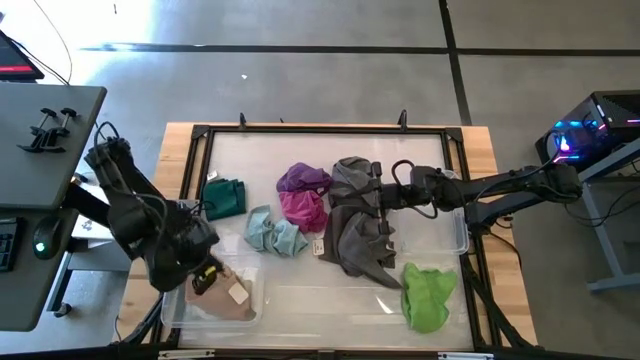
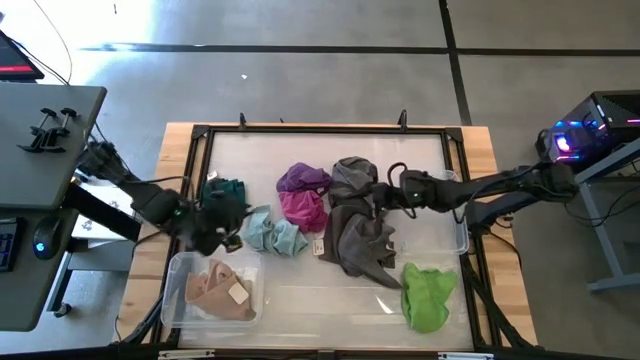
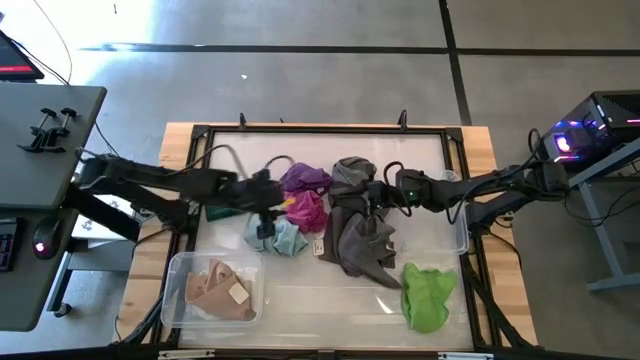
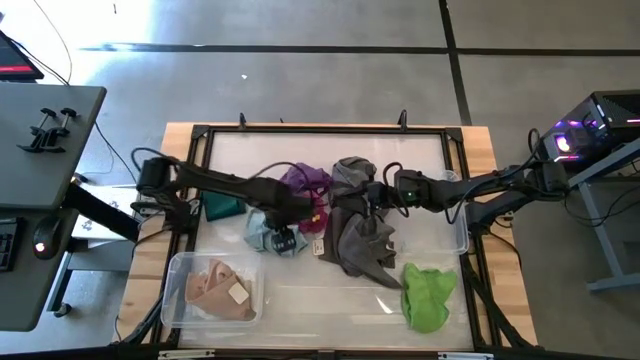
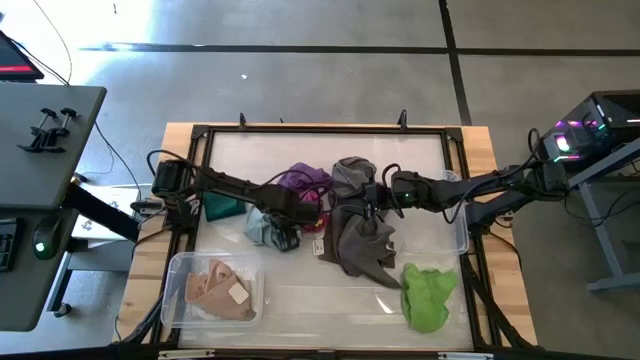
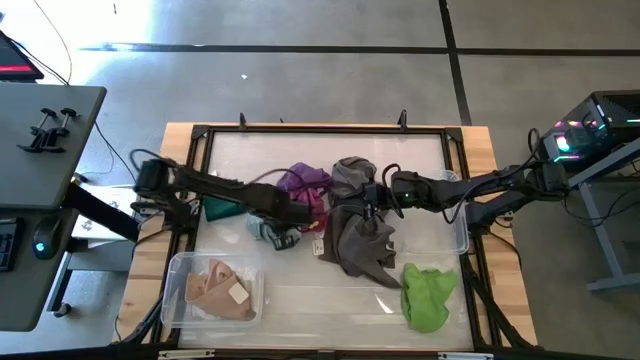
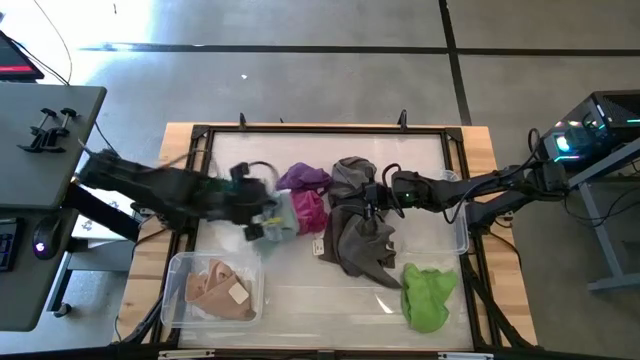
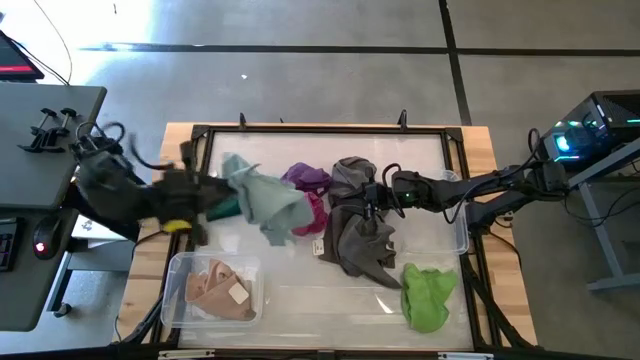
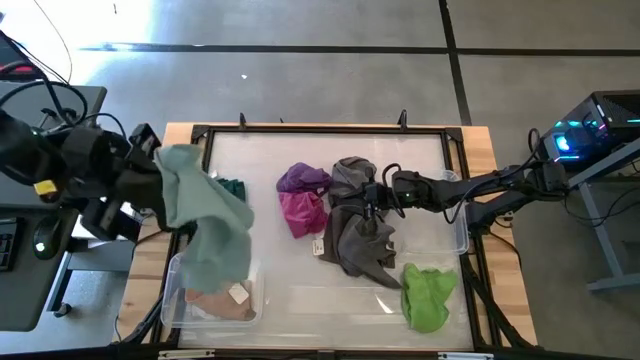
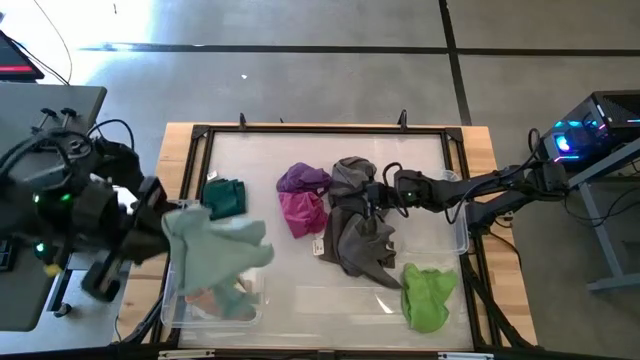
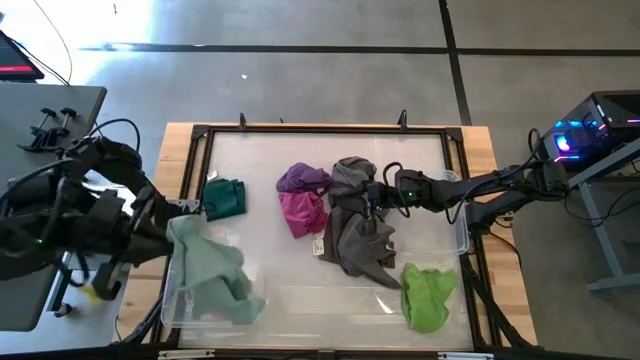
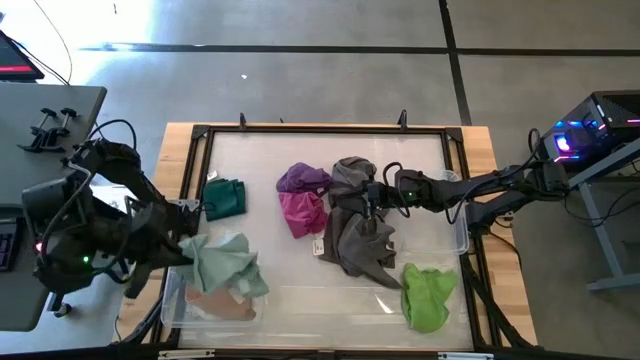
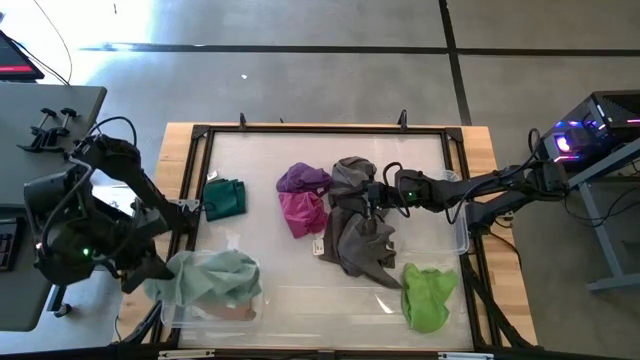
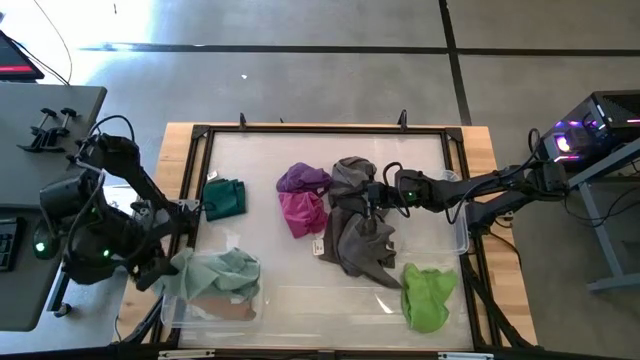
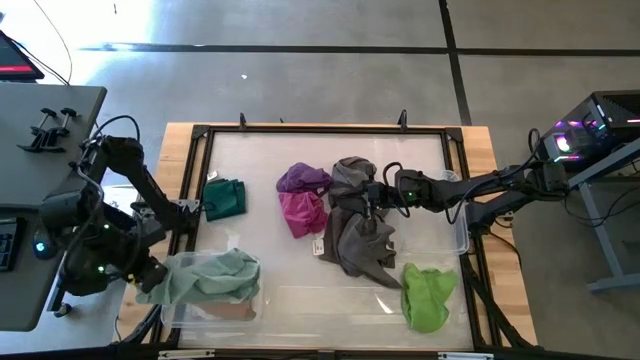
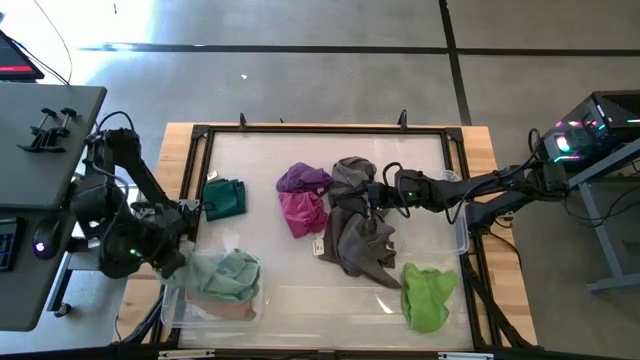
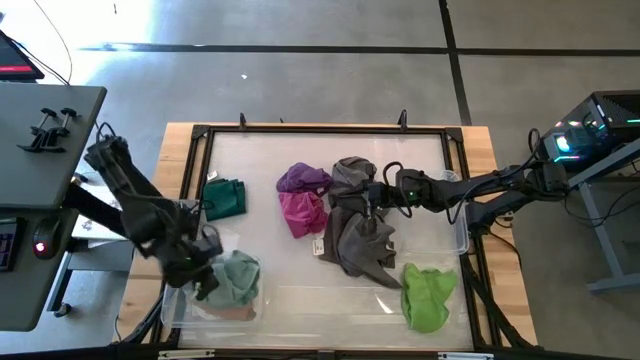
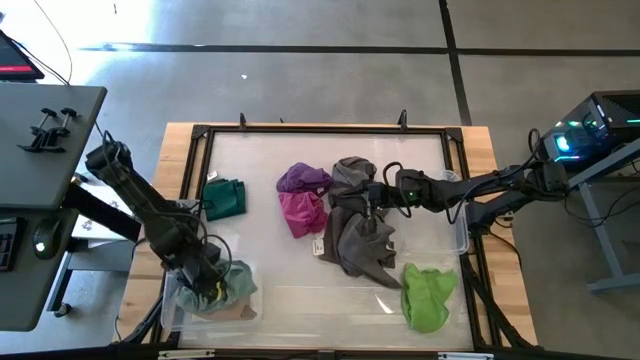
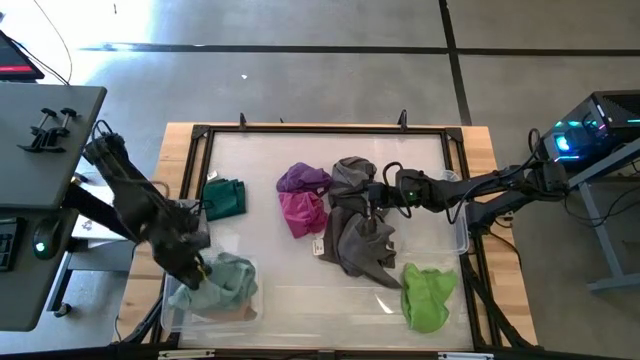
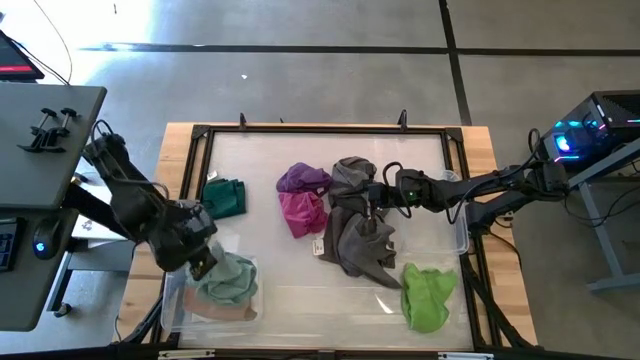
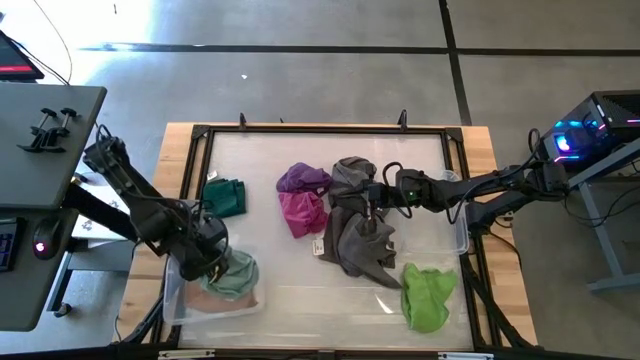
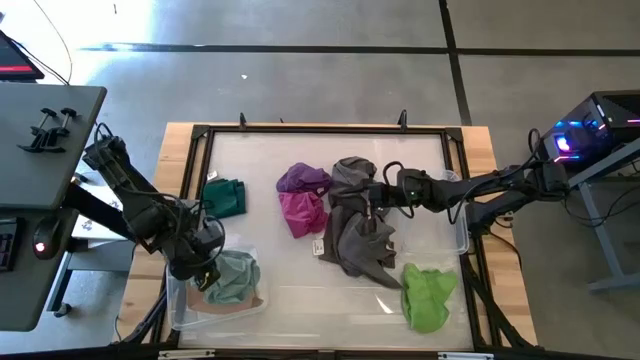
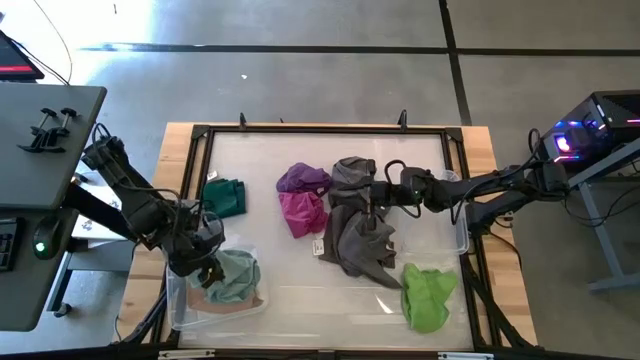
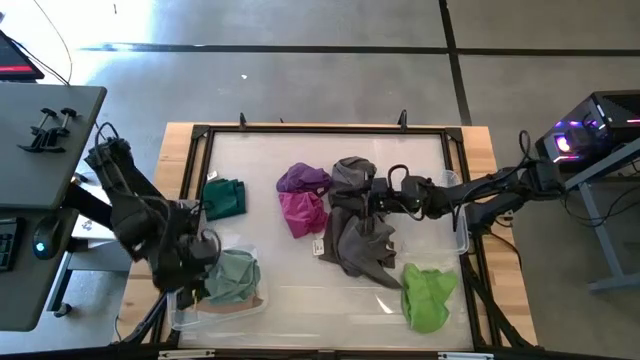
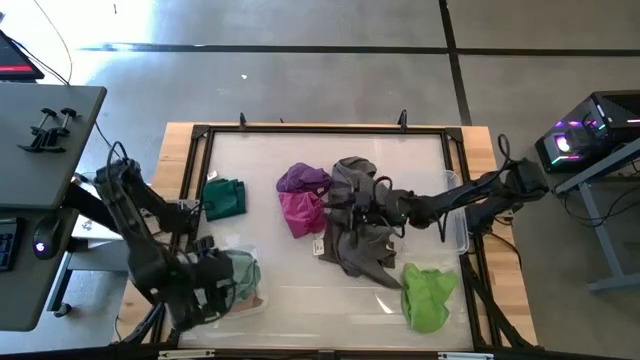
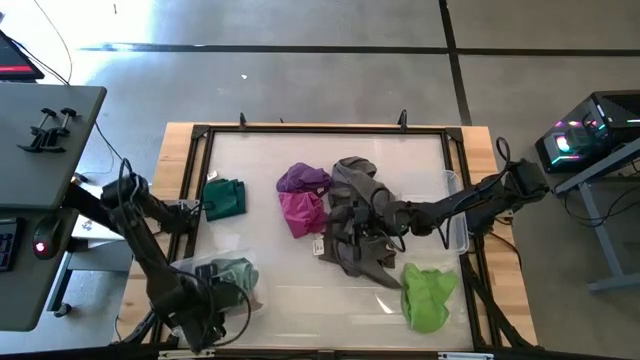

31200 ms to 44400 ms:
Task: Sort microfiber towel by color & place in baskets
Put the light blue microfiber towel into the bottom transparent bin

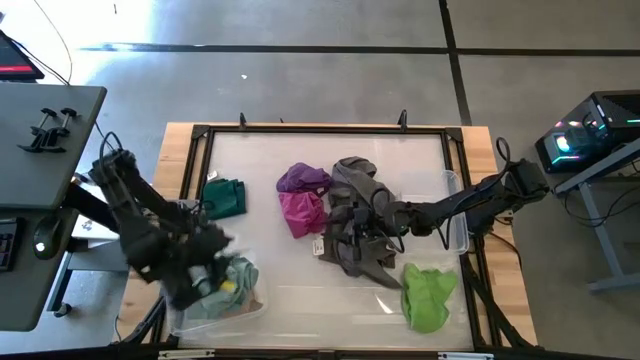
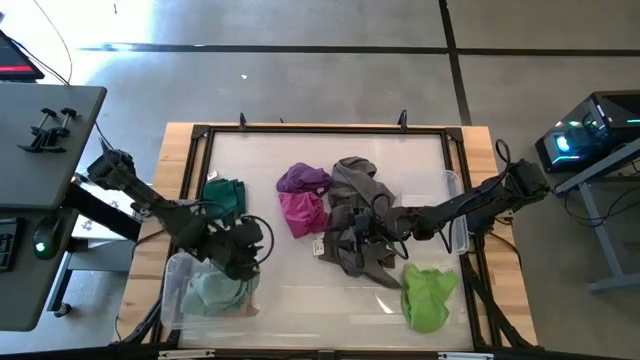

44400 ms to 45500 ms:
Adjust the bottom transparent bin

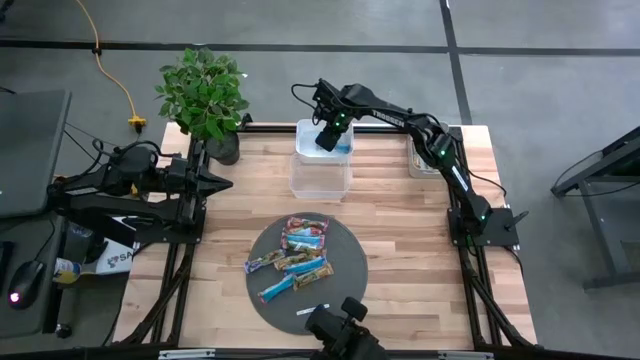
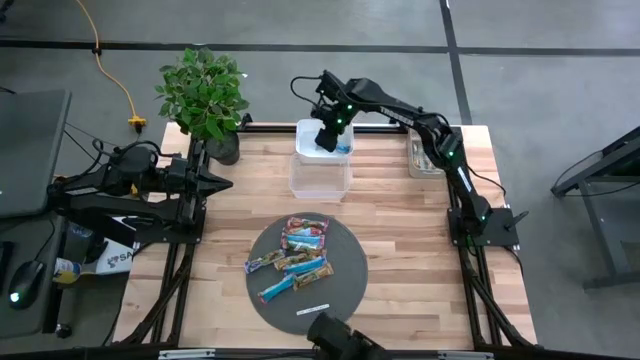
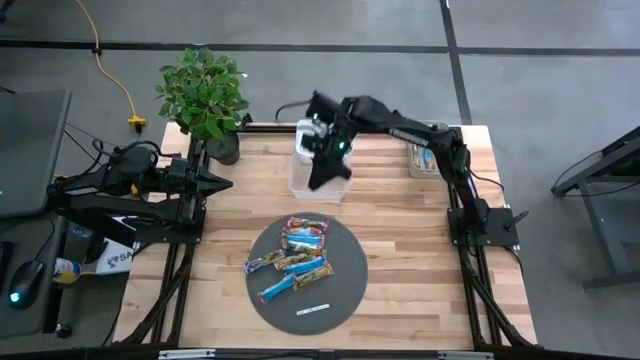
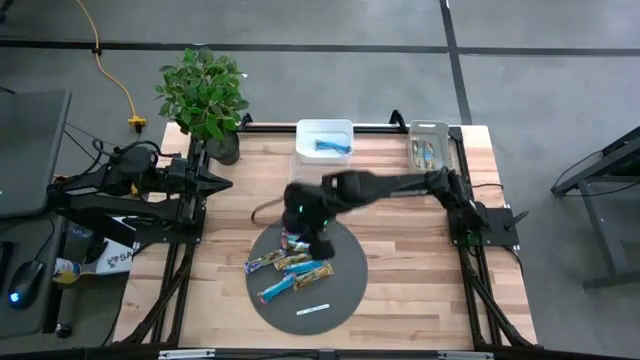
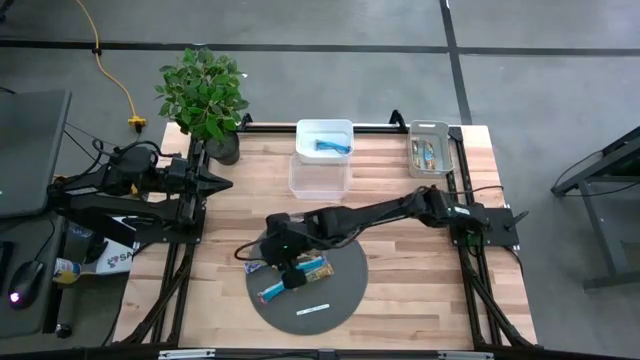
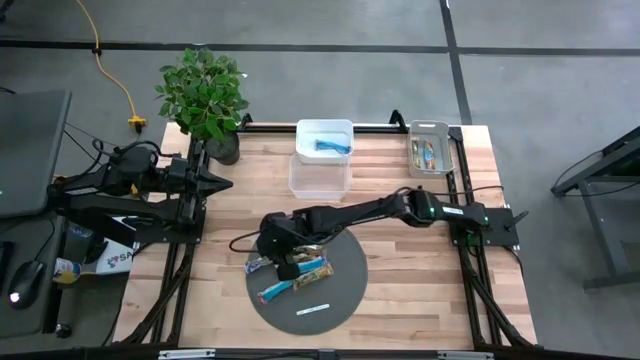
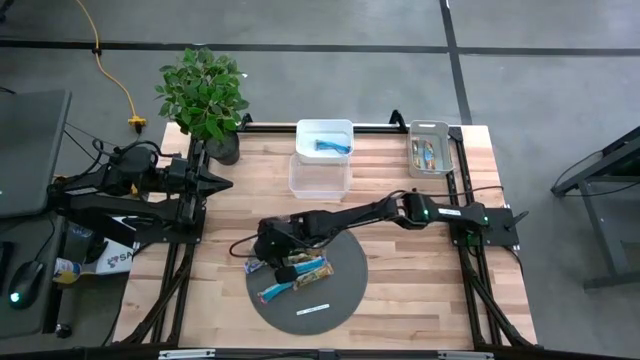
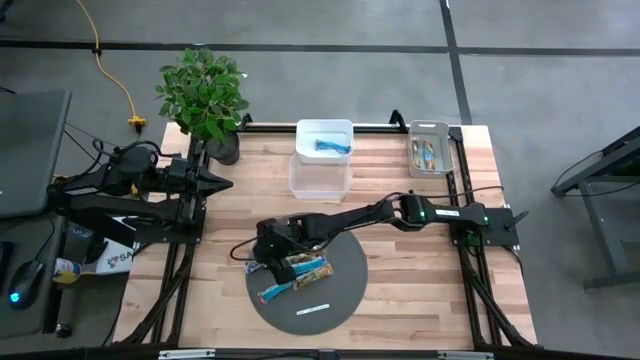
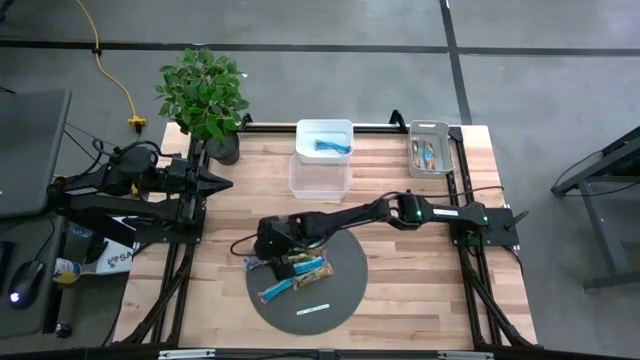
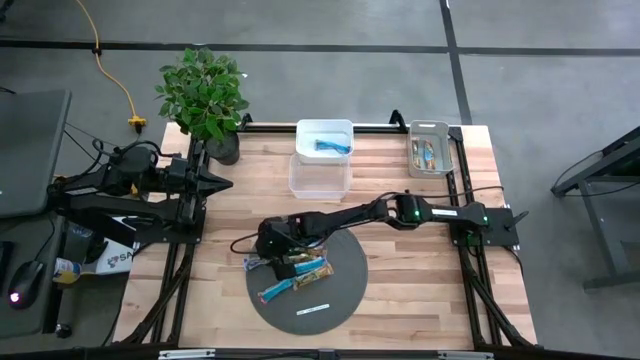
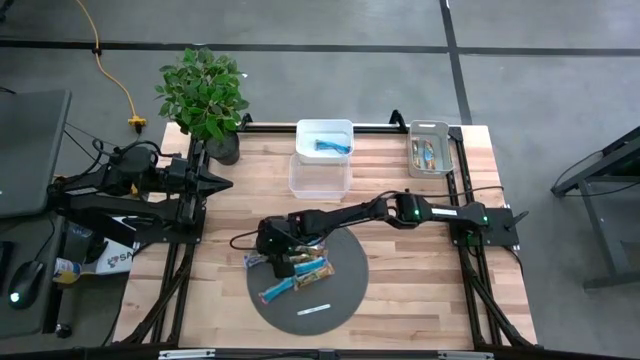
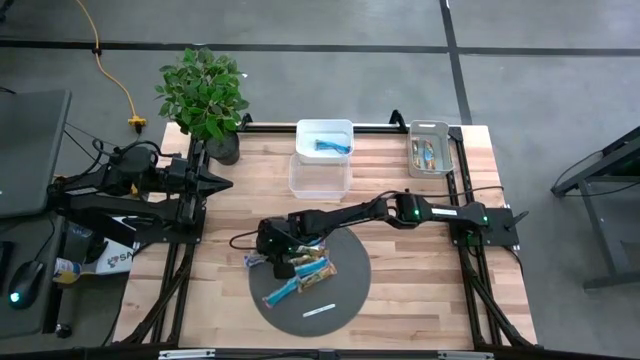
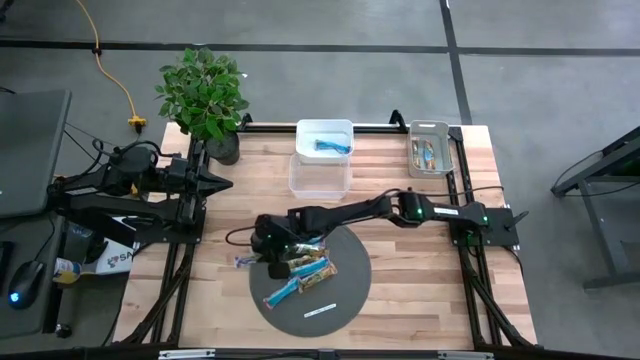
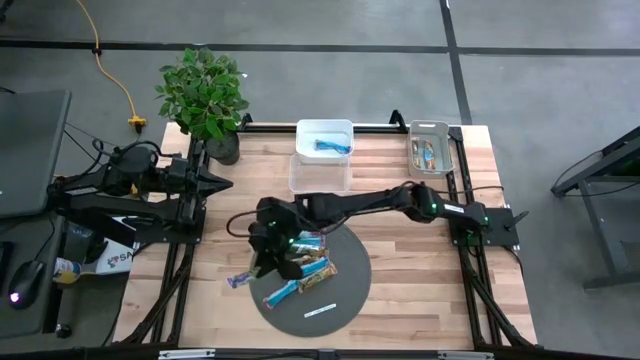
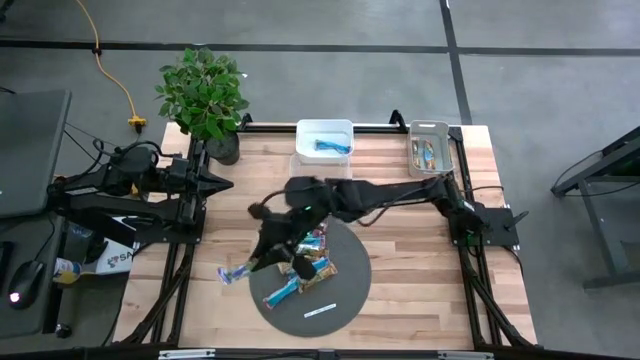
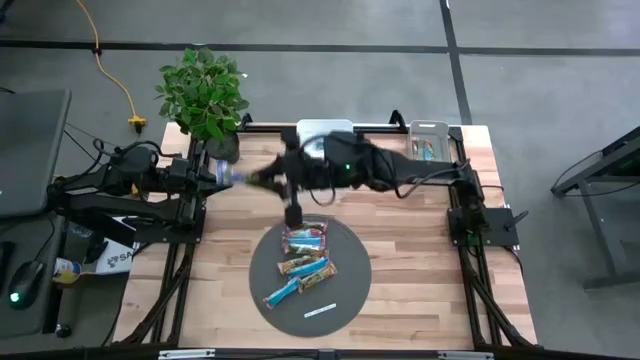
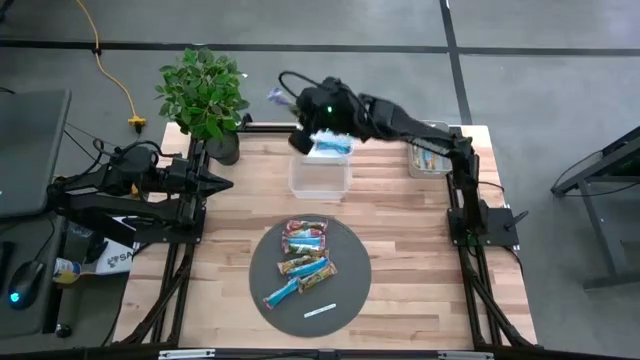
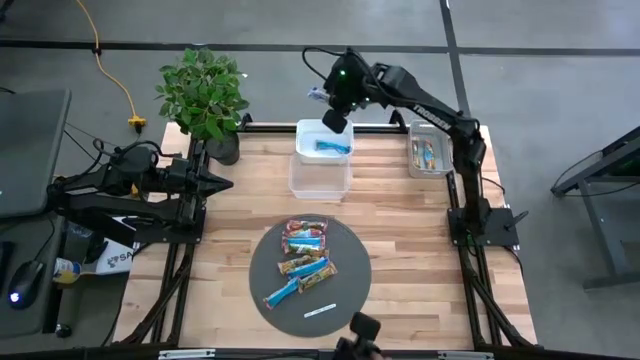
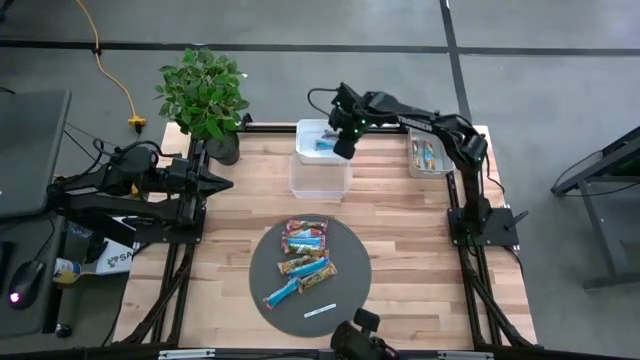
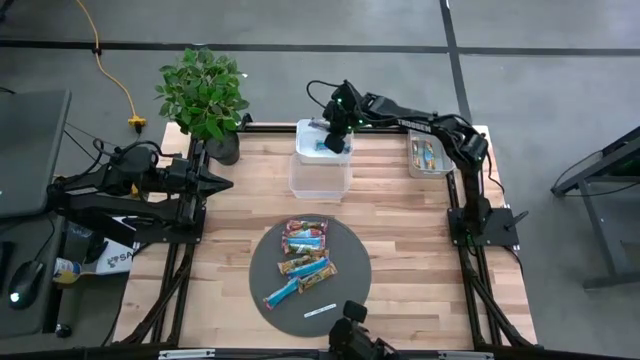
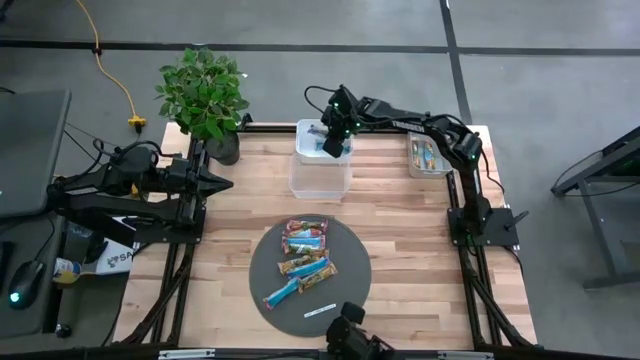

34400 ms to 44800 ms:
Task: Pick and place Granola Bars by type
Put the blue granola bar into the white bin
